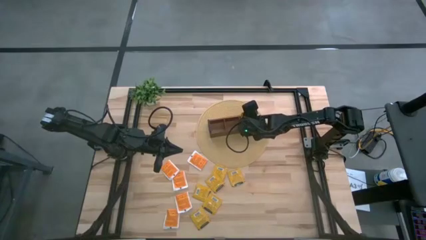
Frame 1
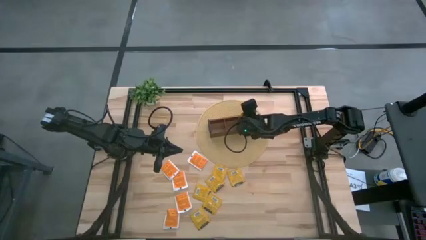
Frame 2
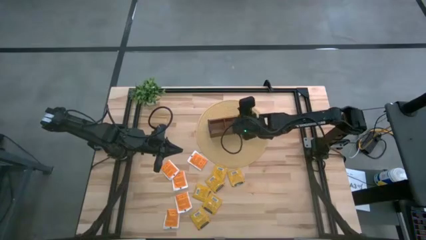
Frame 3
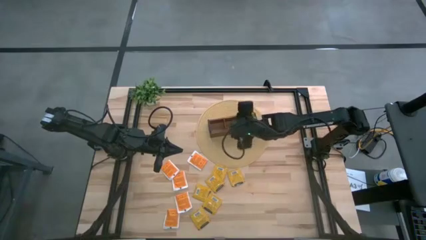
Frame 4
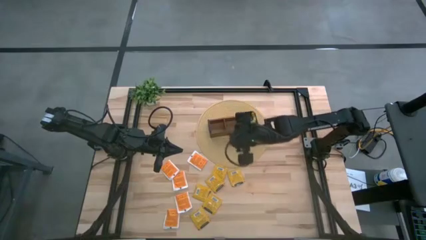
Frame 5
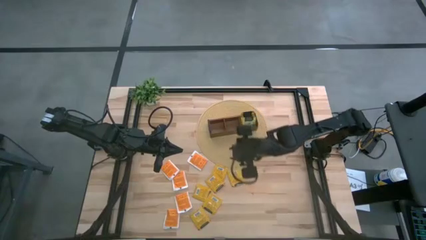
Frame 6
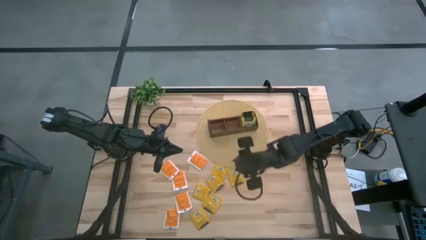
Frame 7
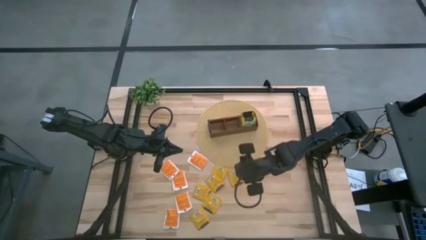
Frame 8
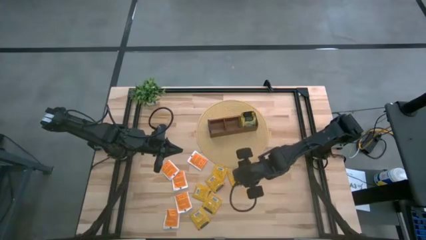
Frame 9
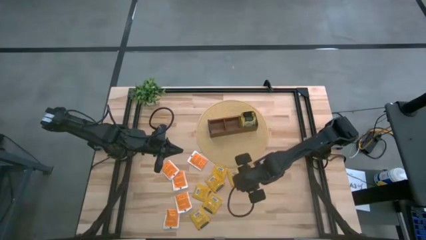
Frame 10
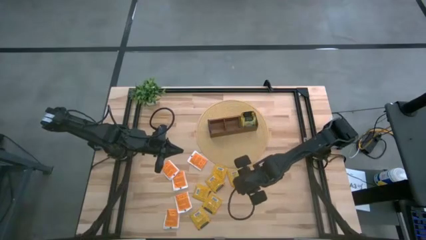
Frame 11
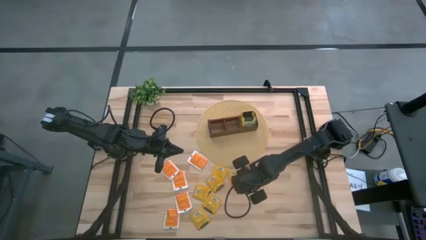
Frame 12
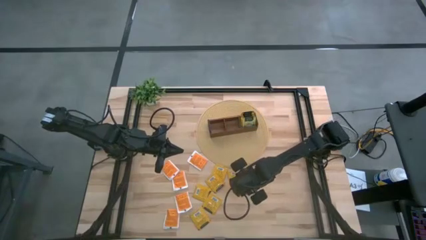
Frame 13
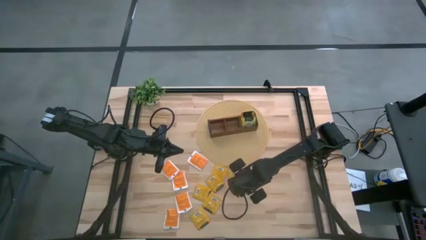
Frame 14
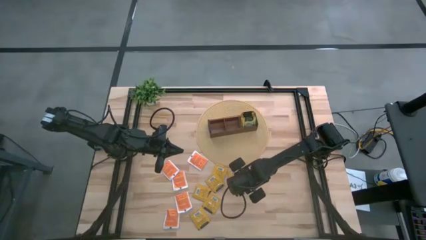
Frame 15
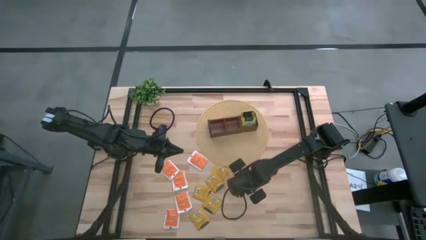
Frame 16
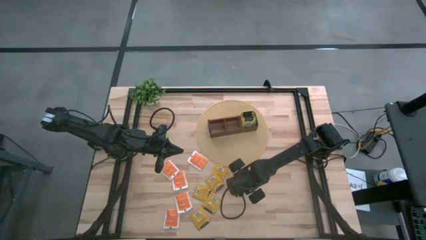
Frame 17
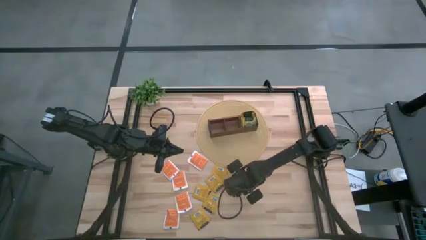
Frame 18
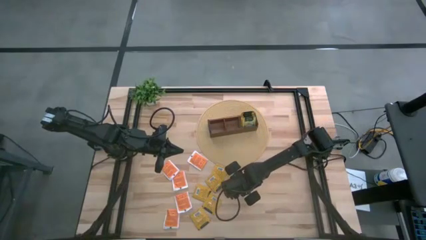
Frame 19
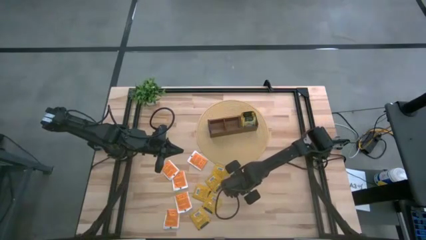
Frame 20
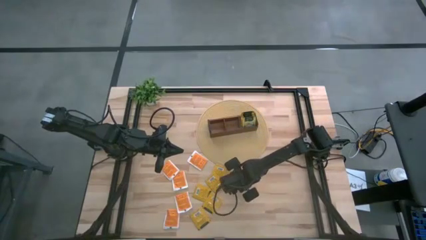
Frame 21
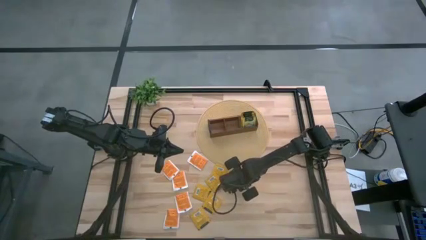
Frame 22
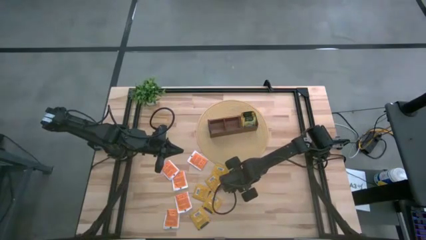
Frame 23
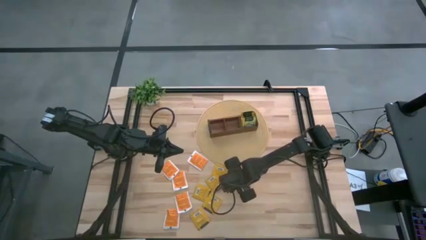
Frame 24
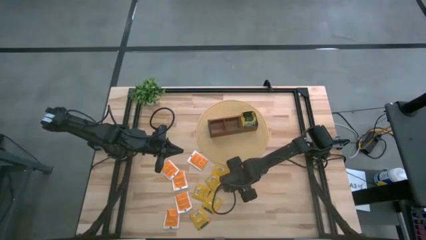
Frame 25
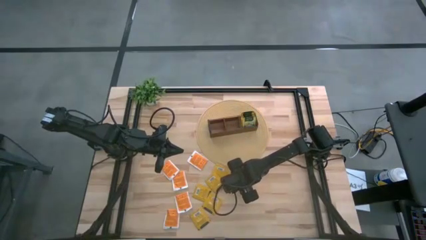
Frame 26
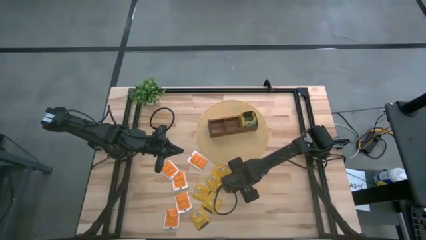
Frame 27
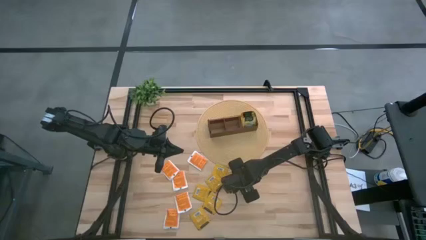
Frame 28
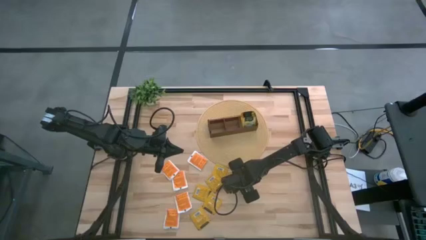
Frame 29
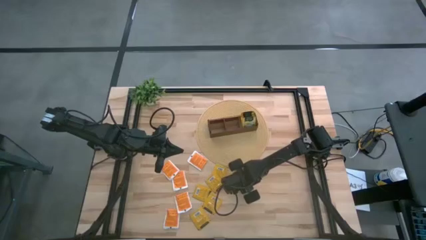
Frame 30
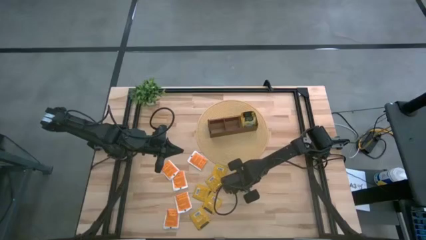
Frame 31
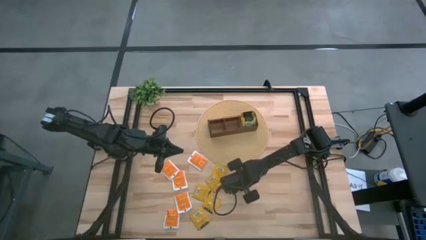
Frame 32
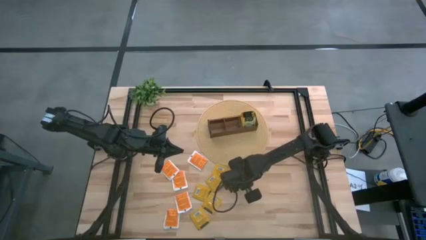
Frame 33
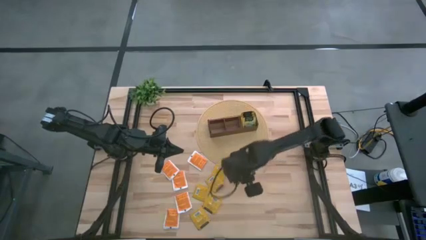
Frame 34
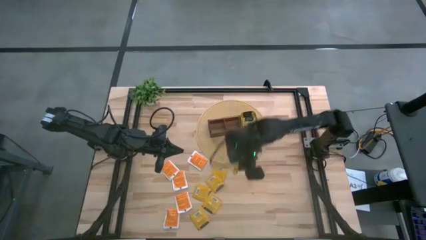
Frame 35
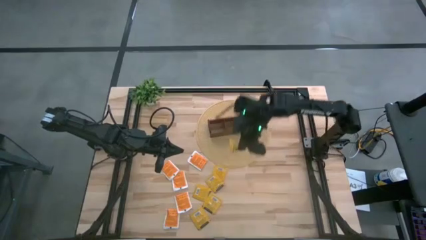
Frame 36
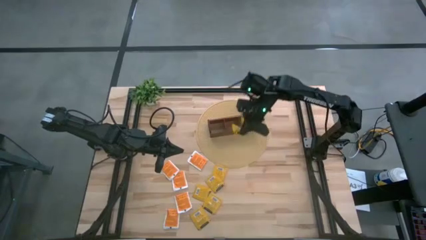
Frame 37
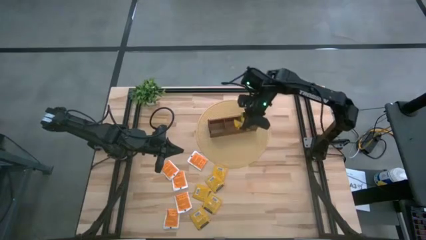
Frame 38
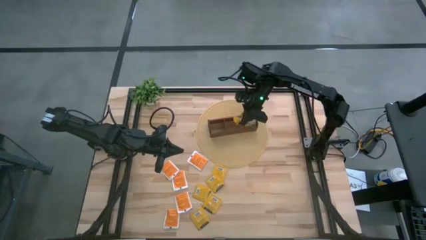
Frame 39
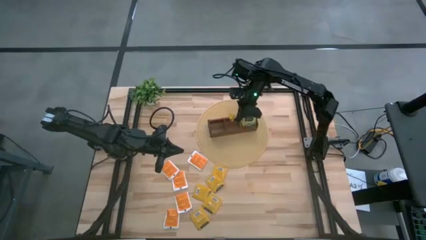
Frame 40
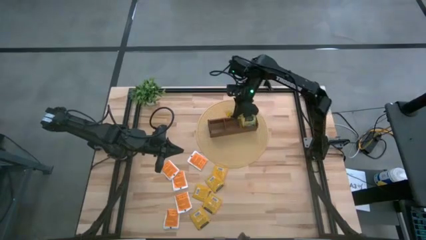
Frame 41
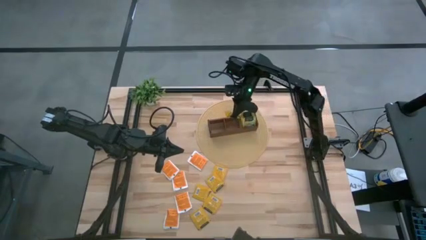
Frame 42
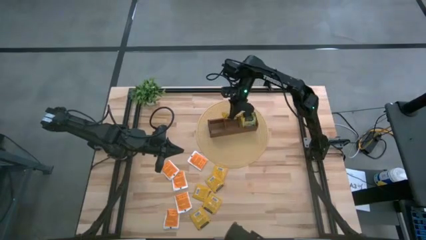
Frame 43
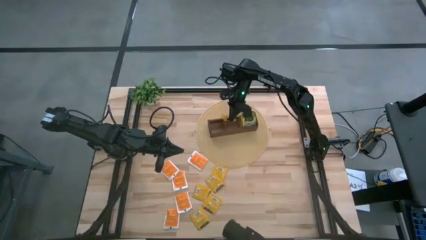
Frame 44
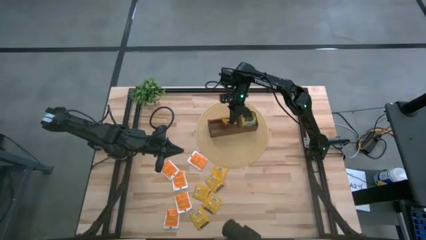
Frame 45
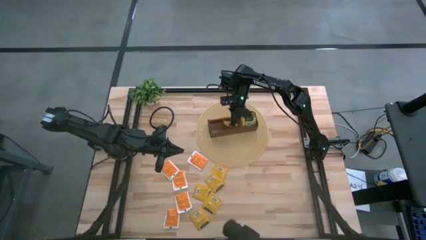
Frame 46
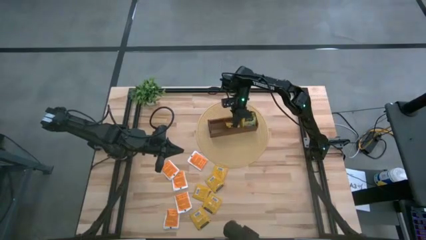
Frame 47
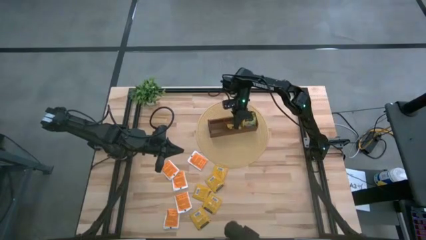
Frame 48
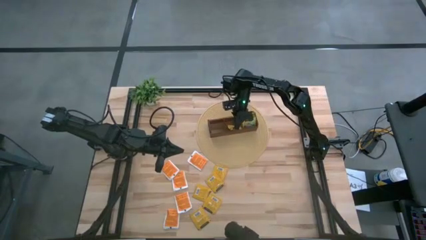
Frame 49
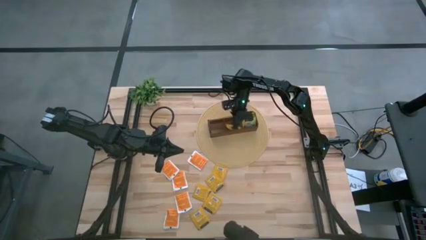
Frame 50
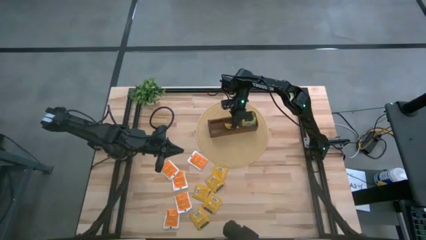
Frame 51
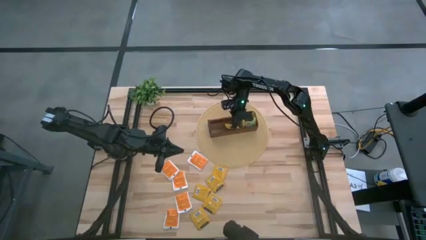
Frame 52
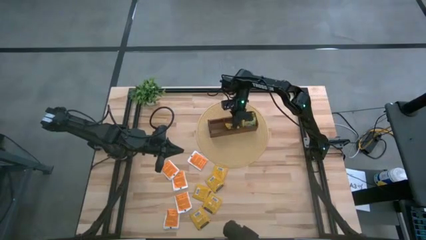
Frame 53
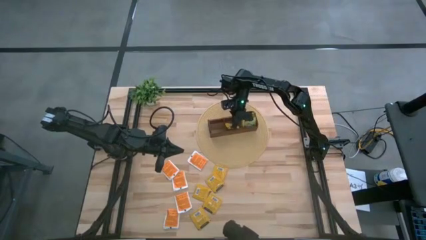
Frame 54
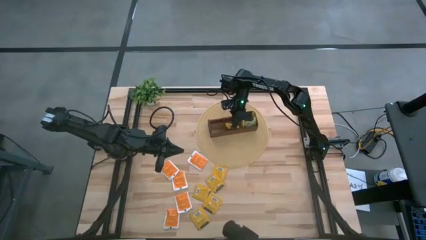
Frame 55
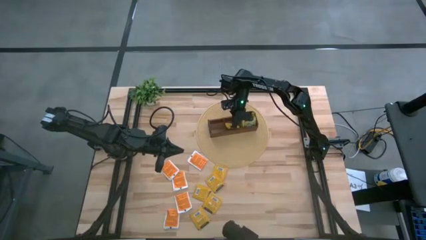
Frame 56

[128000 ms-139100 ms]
Task: Pick & Place Tea
Put the orange tea bag into the middle section of the wooden organizer
